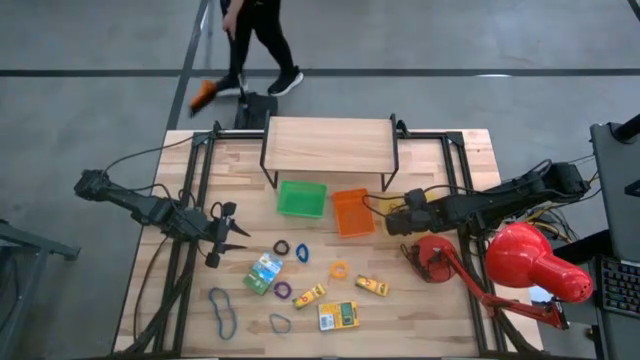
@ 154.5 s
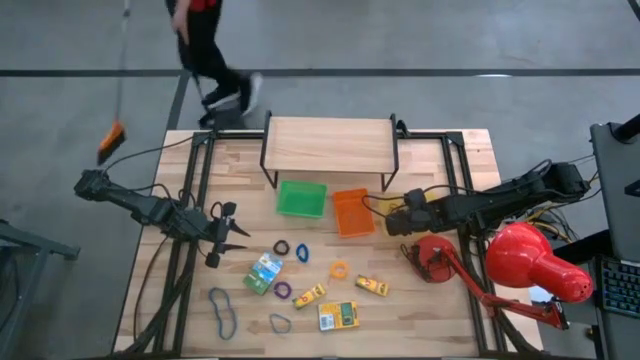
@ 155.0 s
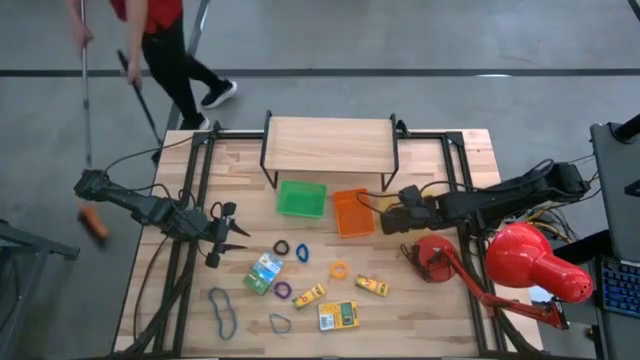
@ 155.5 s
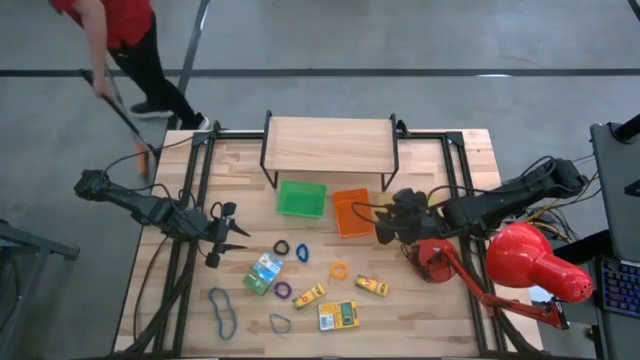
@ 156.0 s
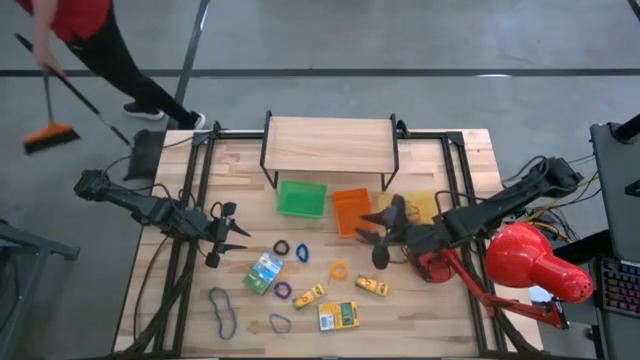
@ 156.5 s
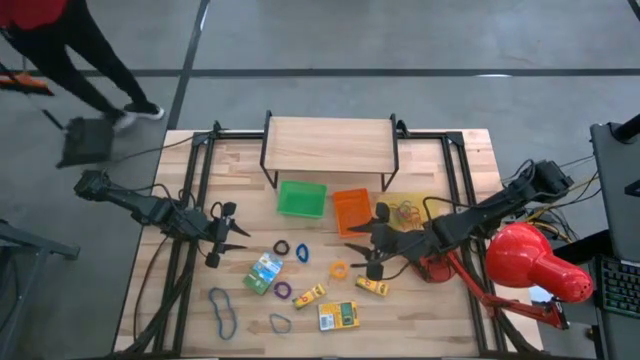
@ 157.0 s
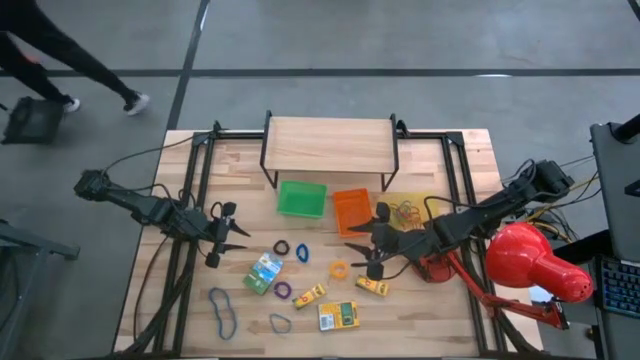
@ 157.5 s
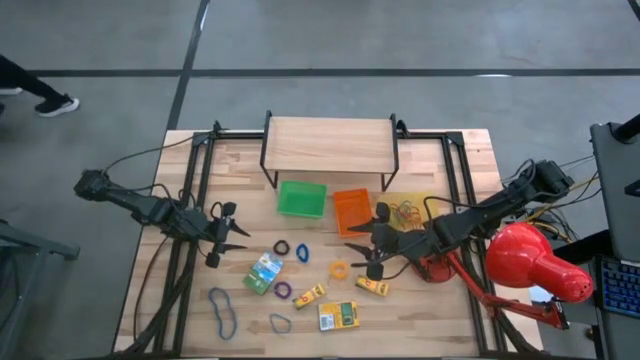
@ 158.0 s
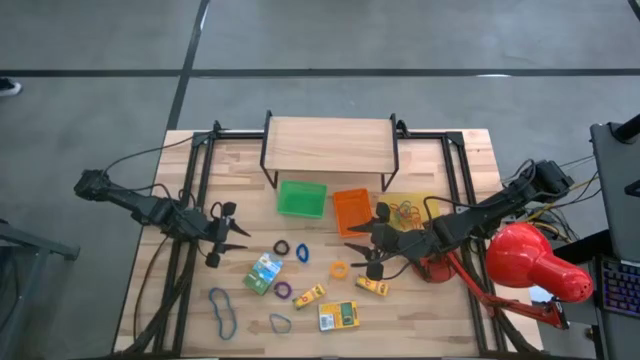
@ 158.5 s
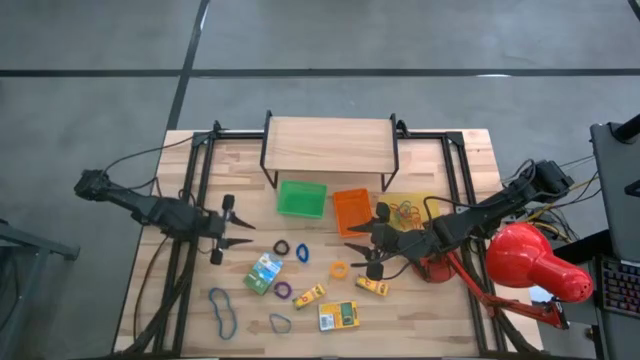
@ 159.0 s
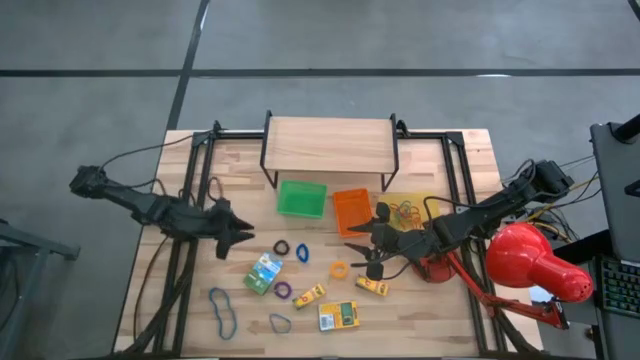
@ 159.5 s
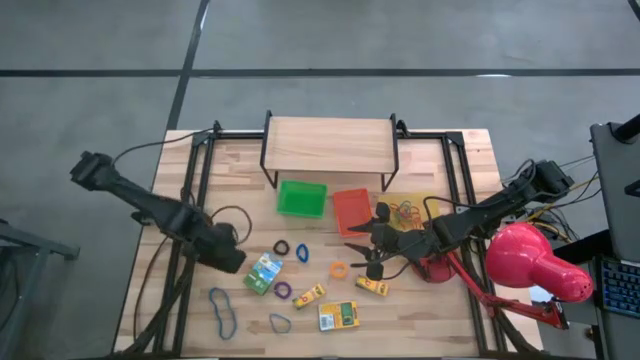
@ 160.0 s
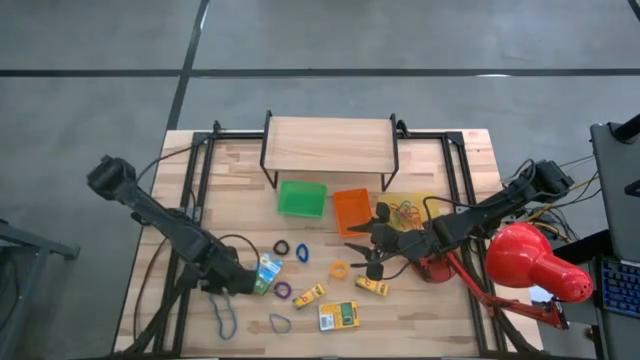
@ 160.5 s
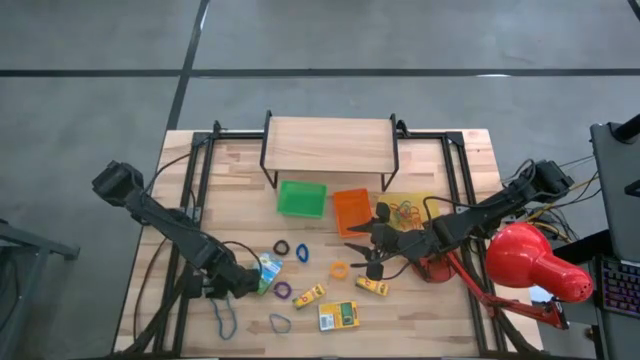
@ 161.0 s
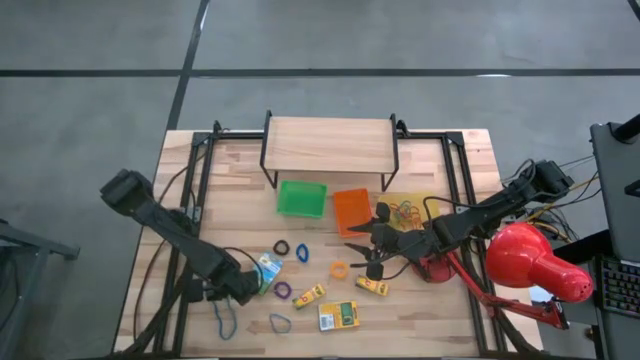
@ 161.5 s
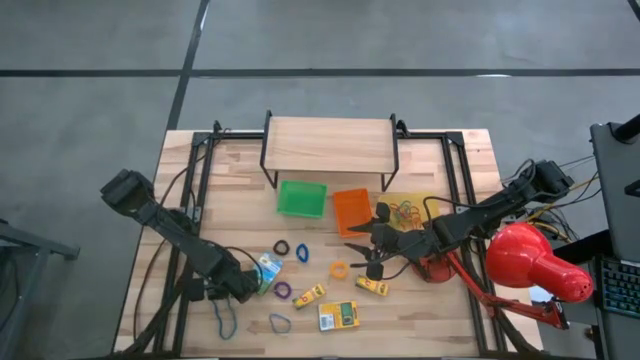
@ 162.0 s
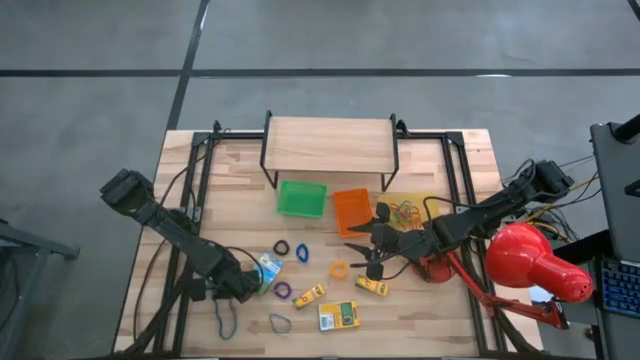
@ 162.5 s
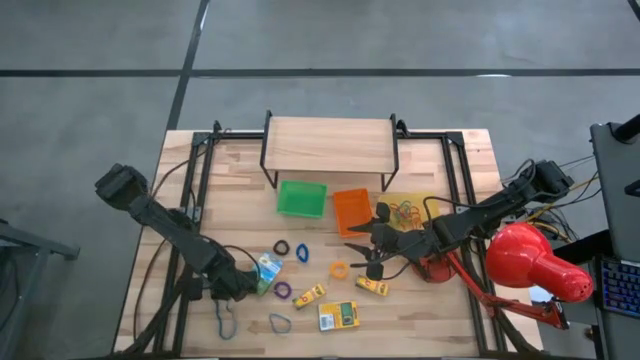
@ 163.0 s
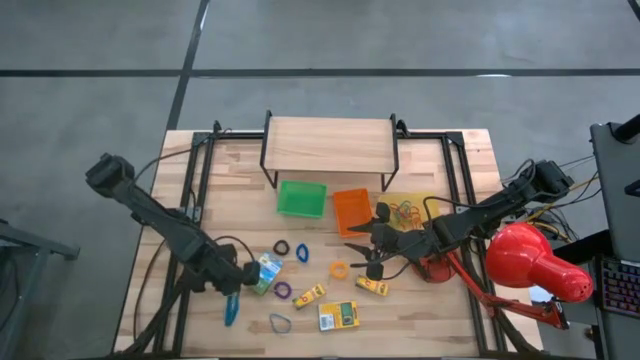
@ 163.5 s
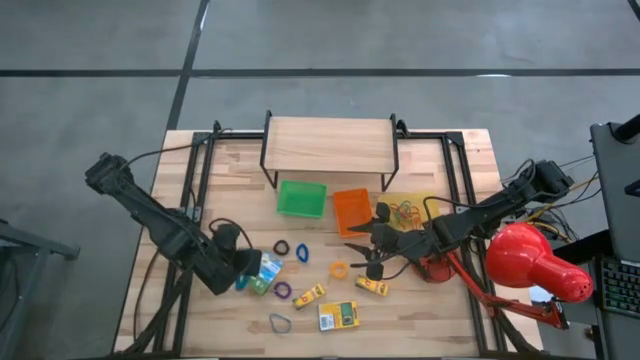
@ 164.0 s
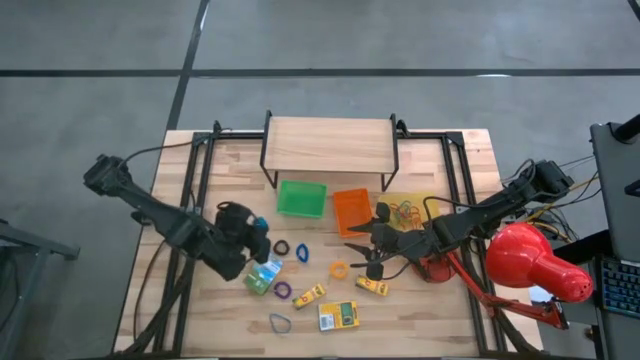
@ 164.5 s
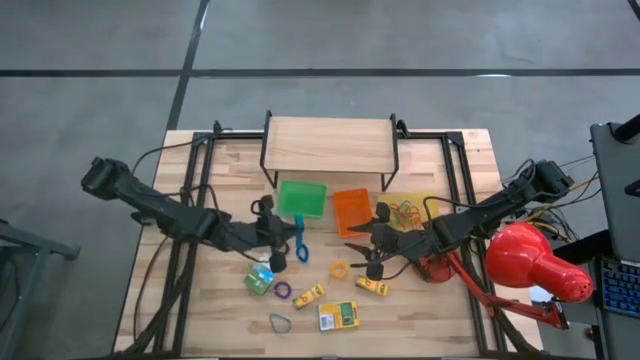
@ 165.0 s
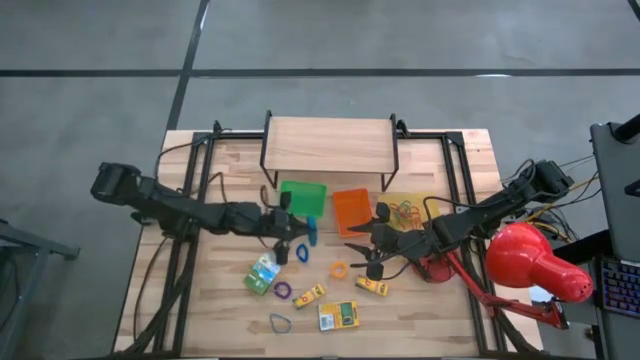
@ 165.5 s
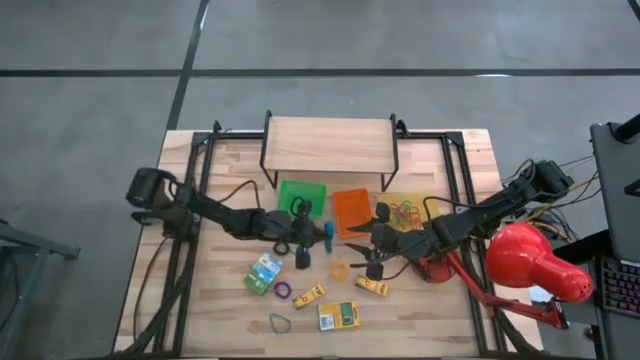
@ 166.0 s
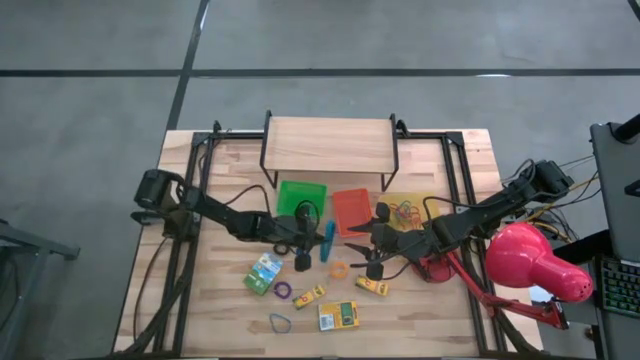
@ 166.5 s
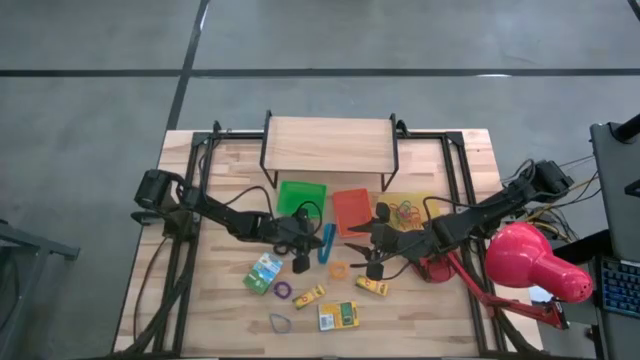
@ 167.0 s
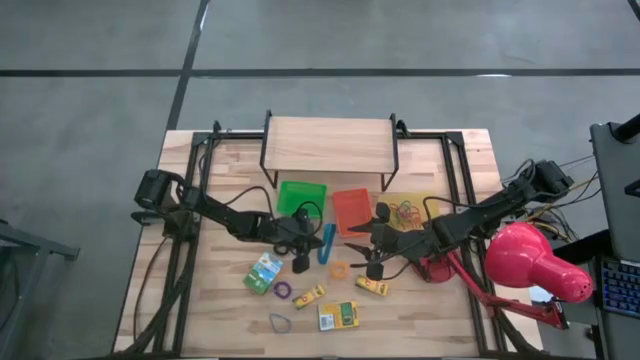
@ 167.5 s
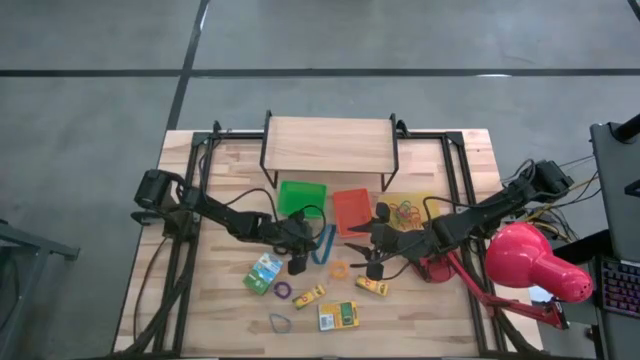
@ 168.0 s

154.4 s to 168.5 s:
Task: Pick & Place Office Desk Supplies
Put the left blue rubber band into the yellow bin

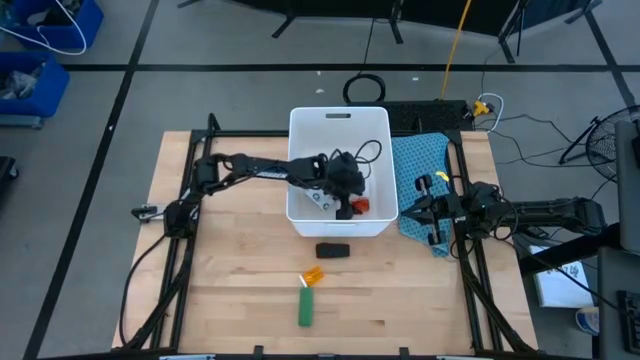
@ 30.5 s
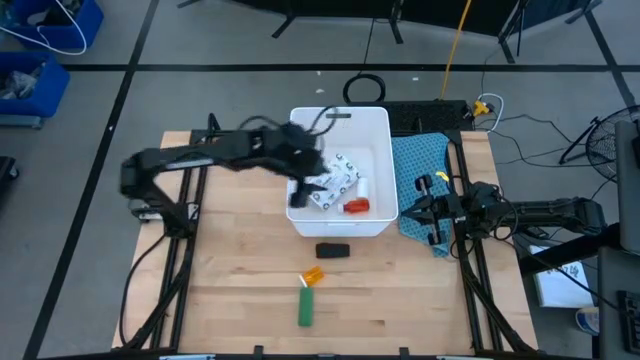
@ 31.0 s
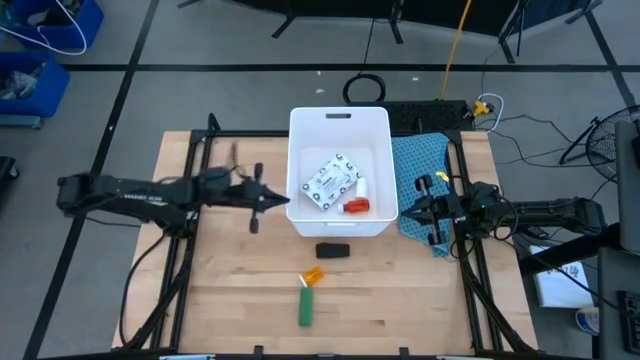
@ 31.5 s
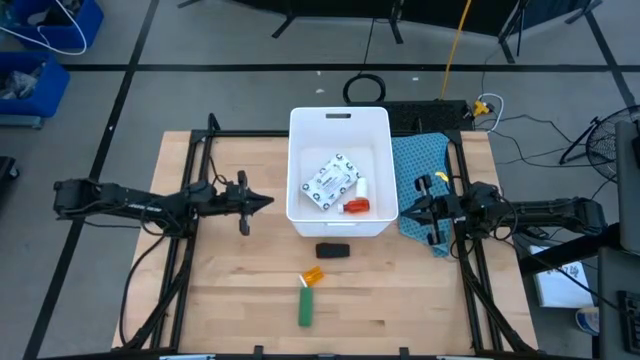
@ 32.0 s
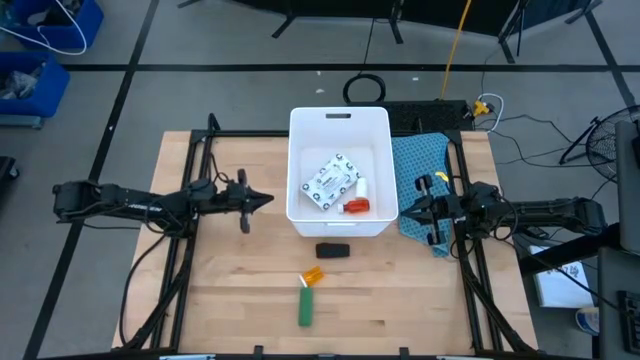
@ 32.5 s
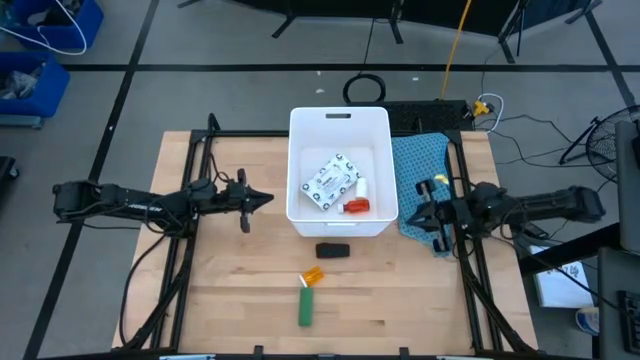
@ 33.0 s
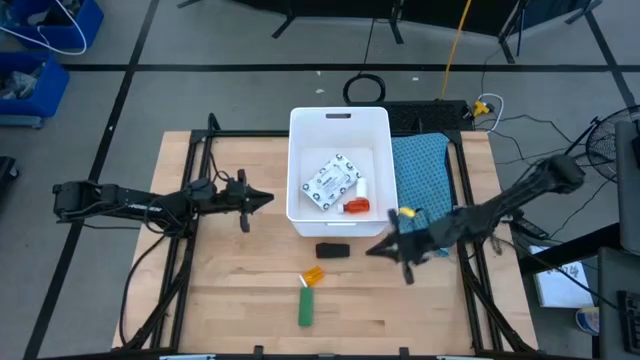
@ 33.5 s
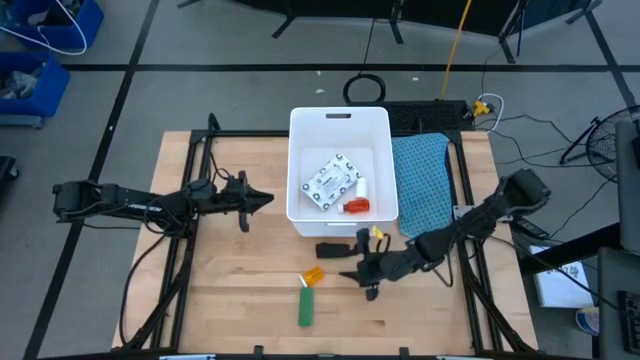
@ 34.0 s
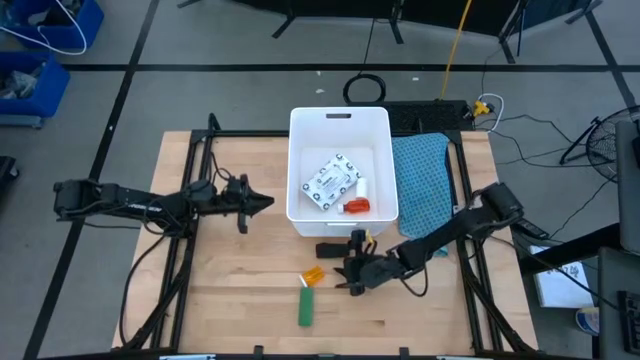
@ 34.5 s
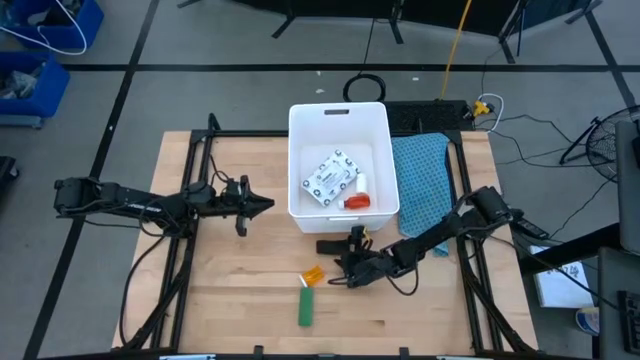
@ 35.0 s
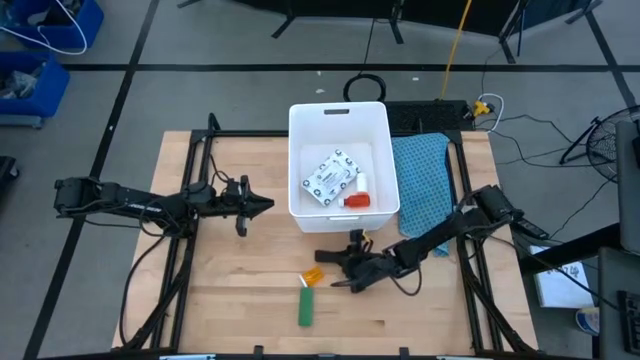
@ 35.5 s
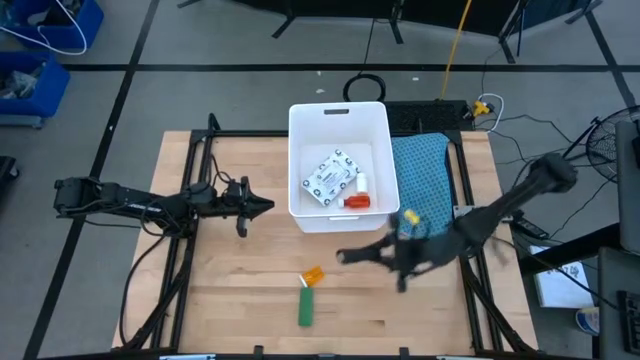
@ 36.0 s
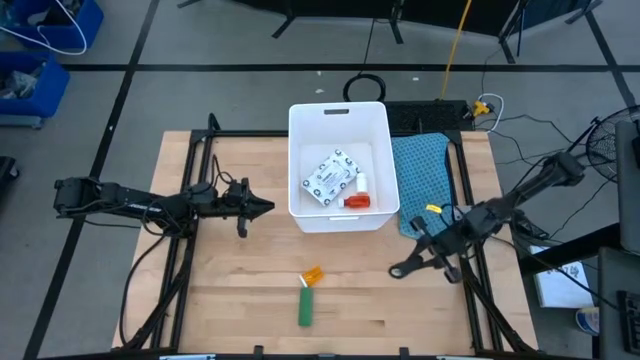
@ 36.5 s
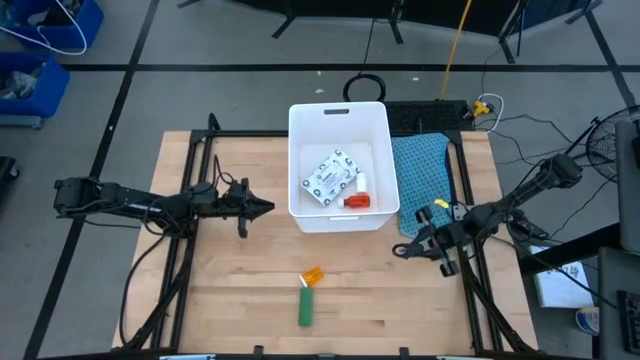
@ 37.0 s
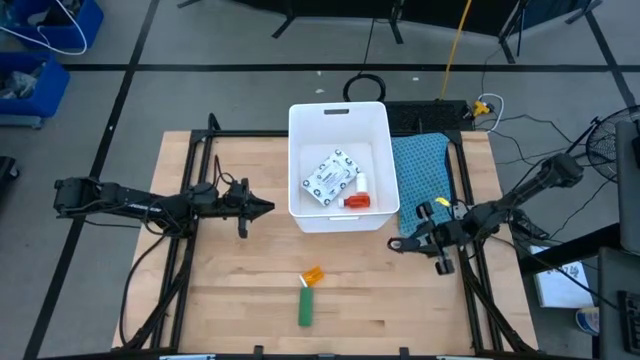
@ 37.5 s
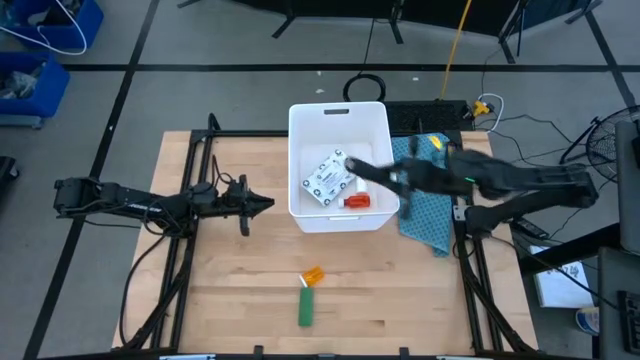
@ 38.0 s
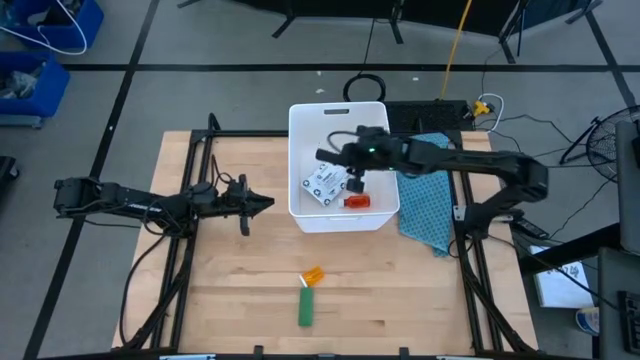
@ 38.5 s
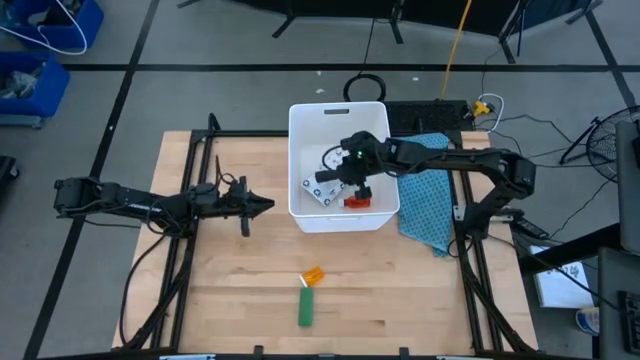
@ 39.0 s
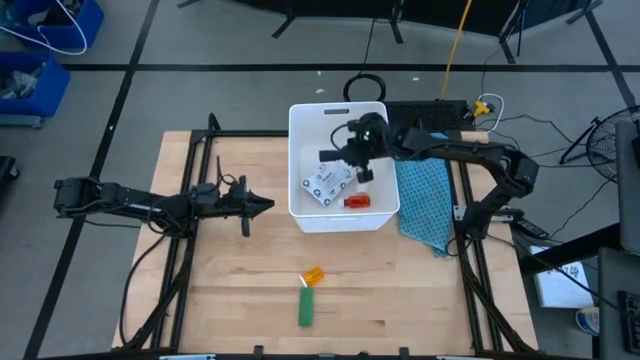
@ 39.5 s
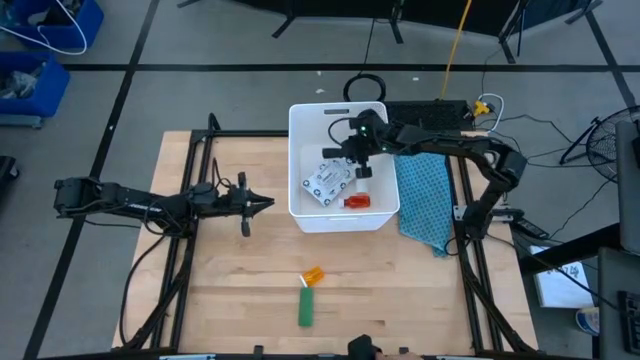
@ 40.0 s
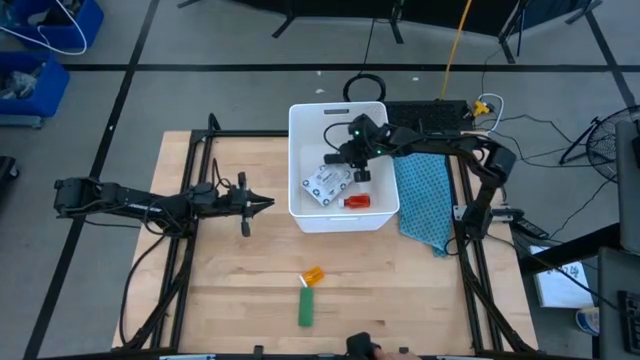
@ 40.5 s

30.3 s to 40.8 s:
Task: Pick & place medical supplies in basket/bin
Put the black bandage into the white bin
